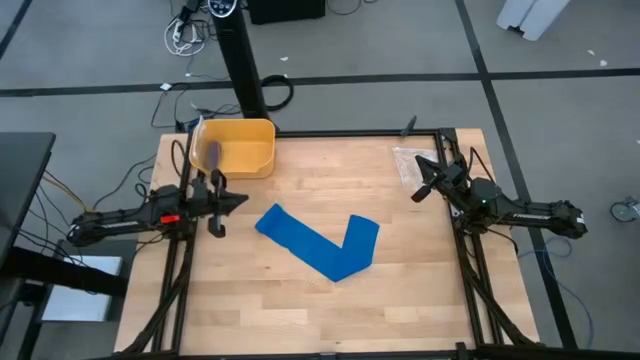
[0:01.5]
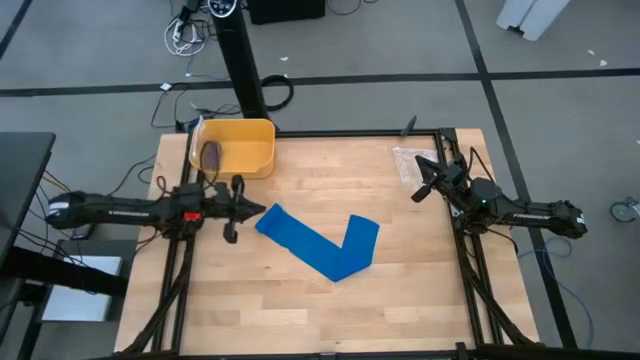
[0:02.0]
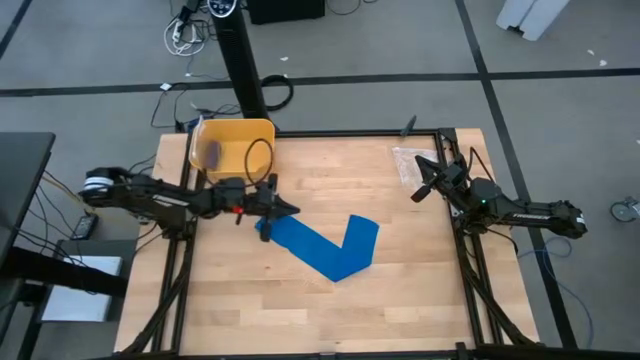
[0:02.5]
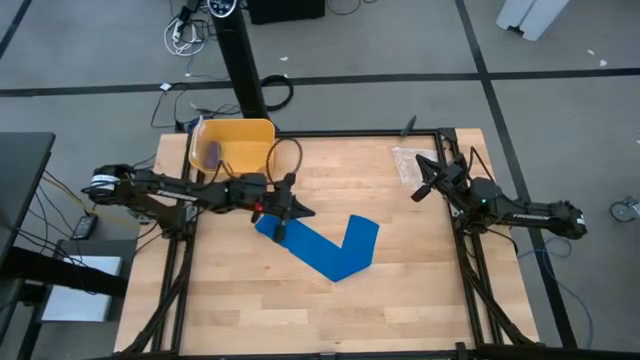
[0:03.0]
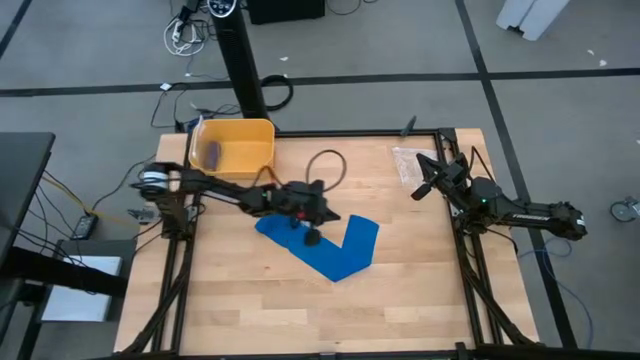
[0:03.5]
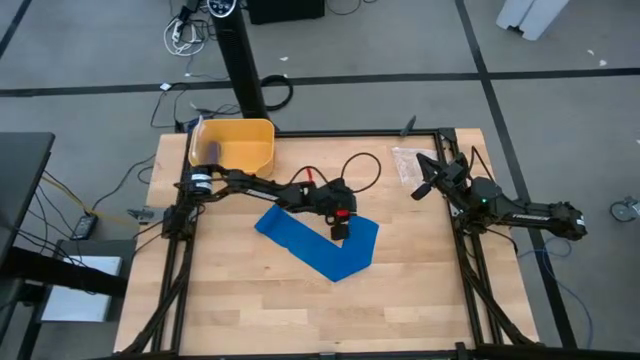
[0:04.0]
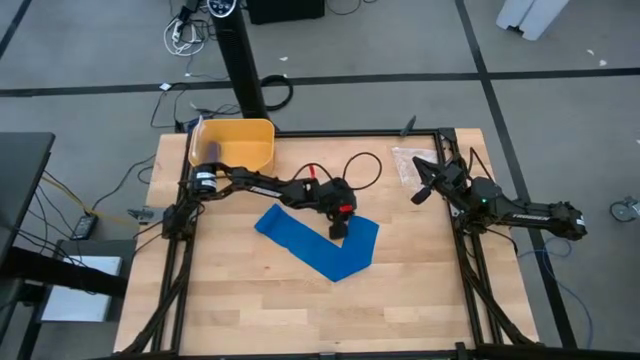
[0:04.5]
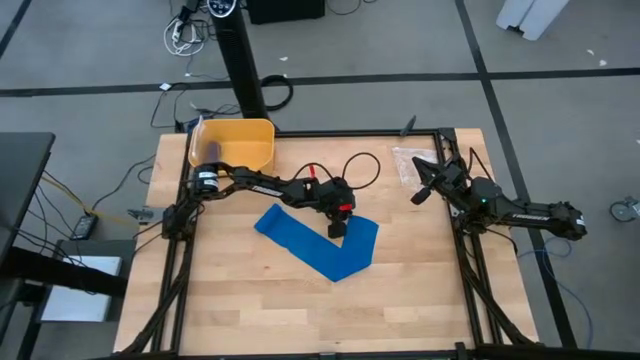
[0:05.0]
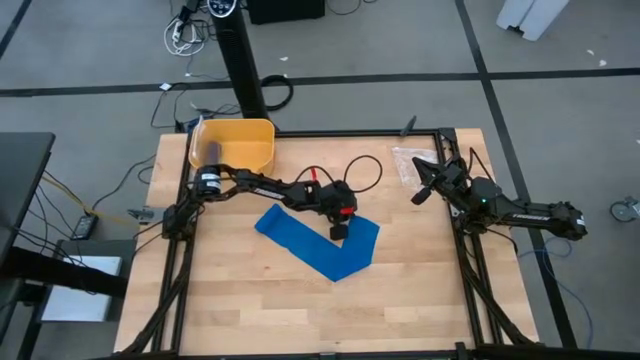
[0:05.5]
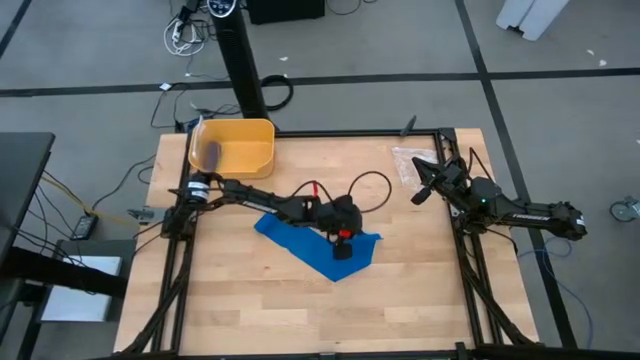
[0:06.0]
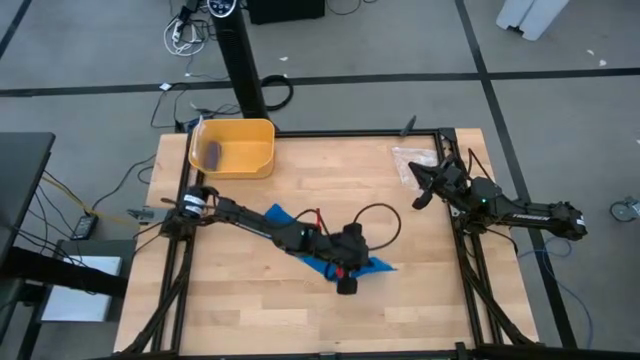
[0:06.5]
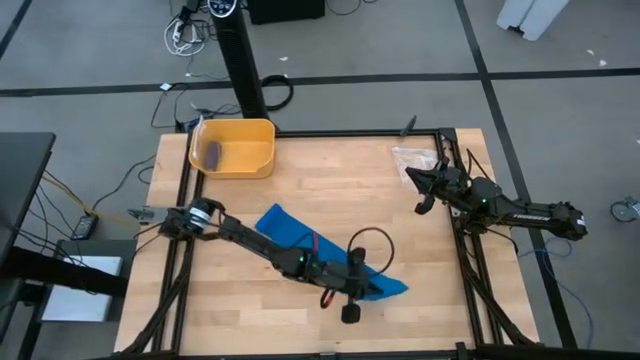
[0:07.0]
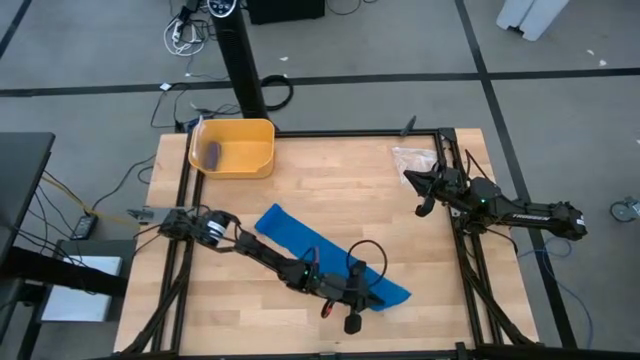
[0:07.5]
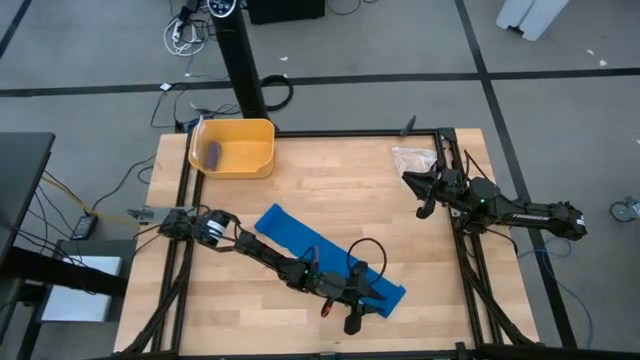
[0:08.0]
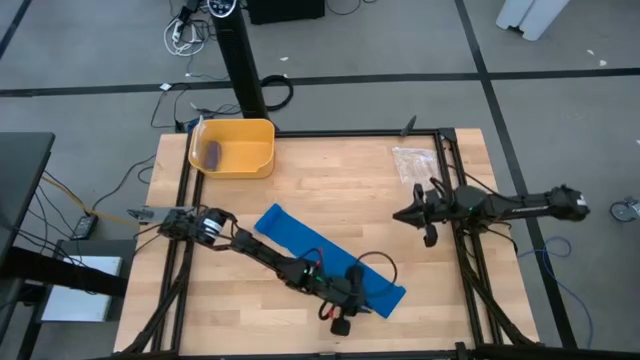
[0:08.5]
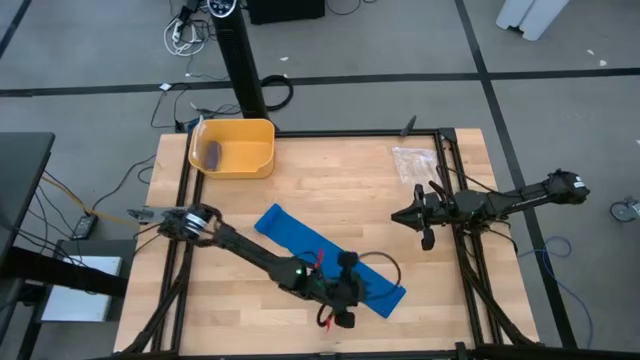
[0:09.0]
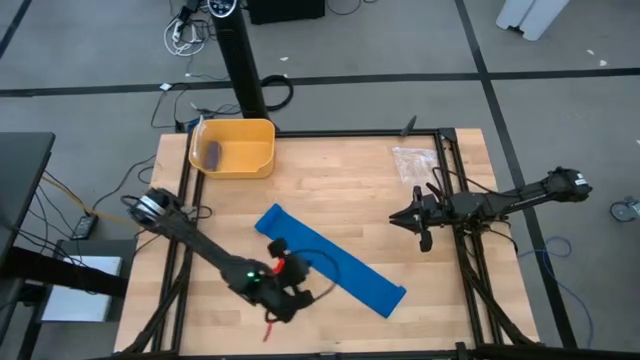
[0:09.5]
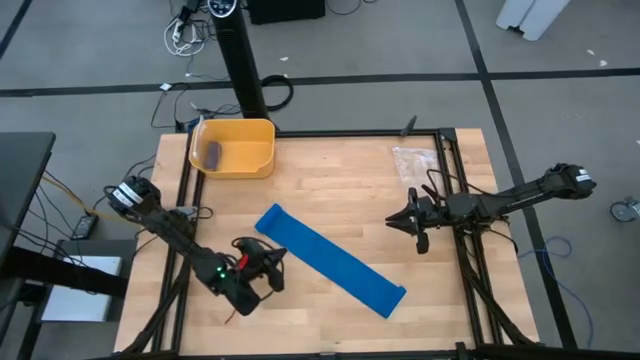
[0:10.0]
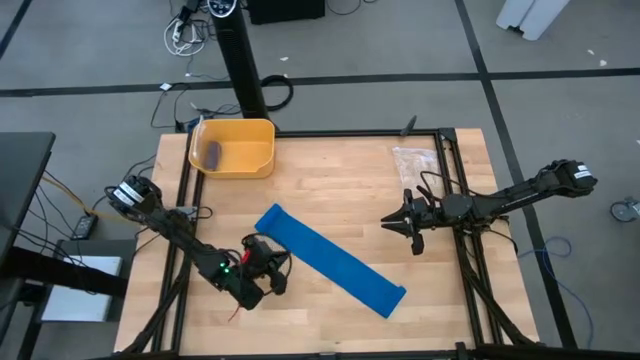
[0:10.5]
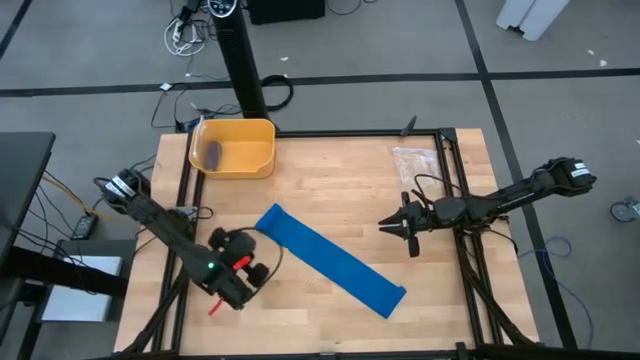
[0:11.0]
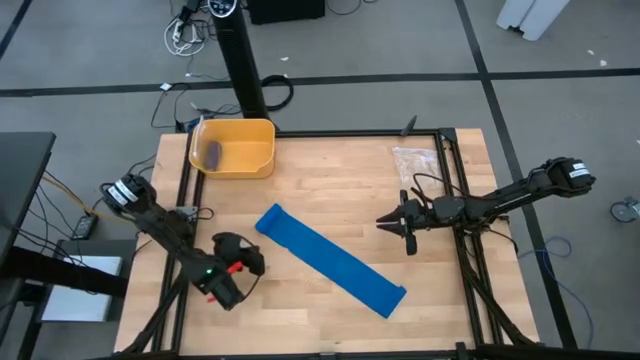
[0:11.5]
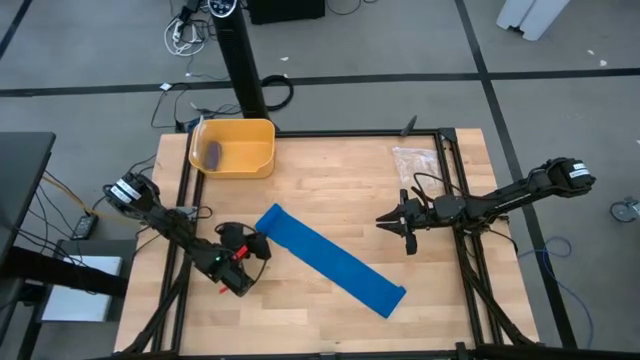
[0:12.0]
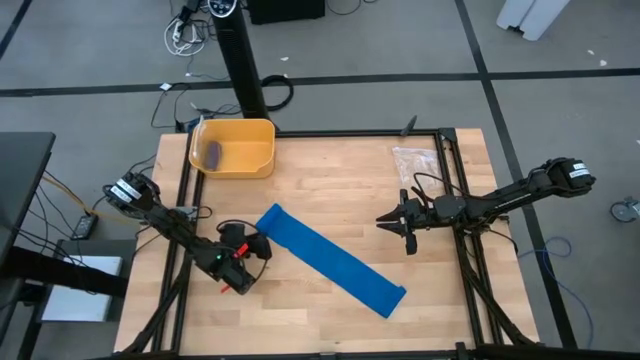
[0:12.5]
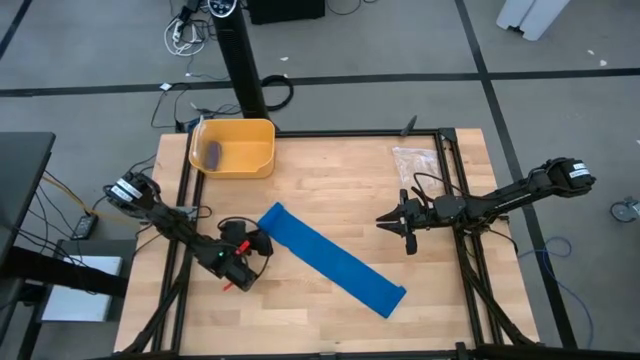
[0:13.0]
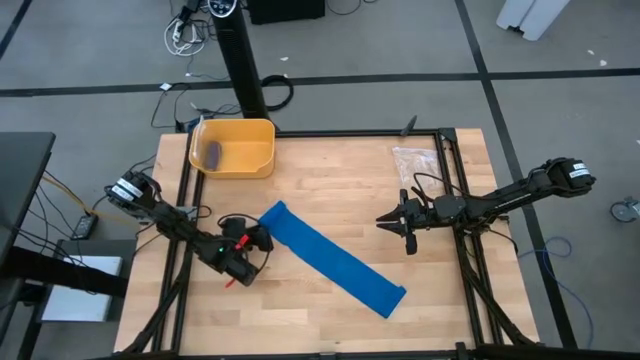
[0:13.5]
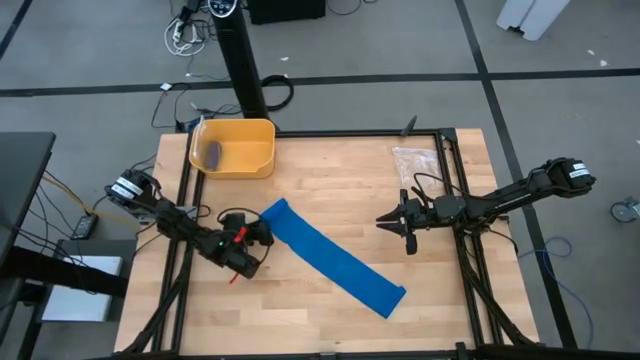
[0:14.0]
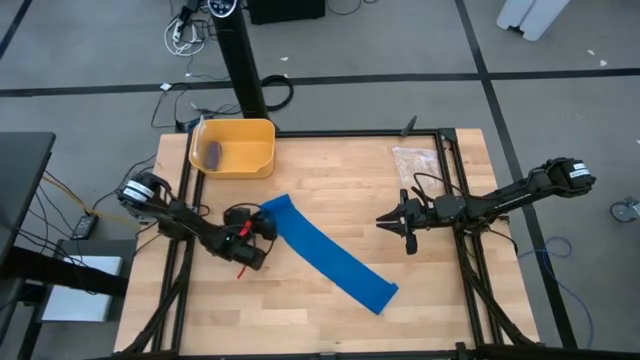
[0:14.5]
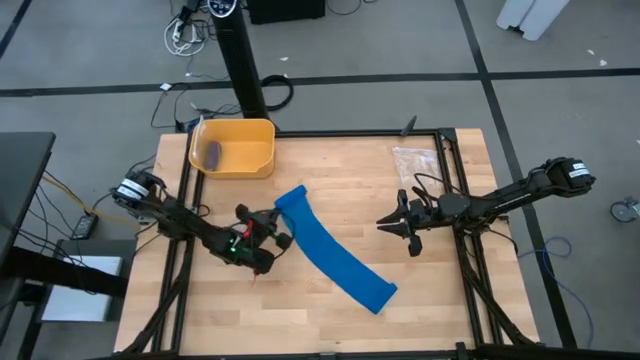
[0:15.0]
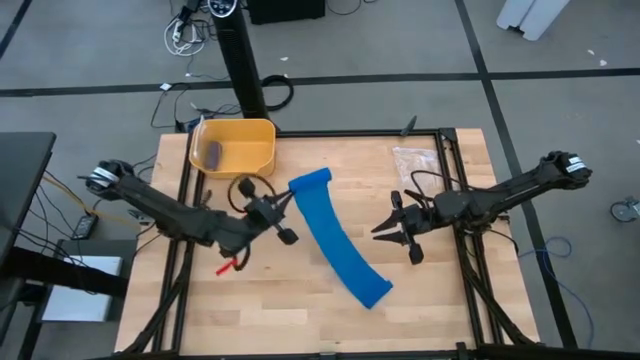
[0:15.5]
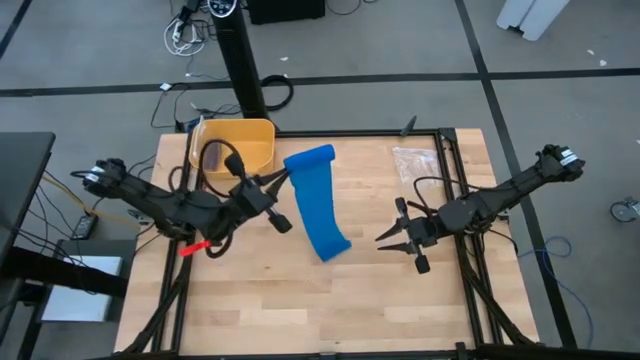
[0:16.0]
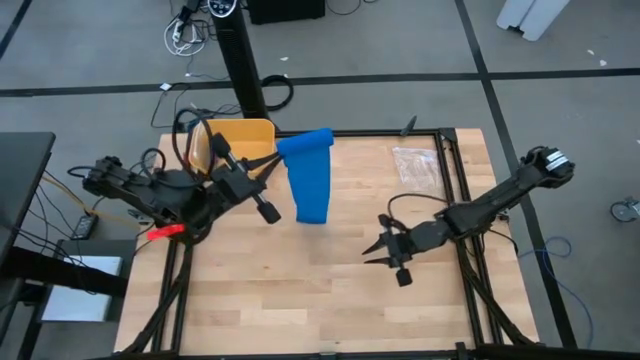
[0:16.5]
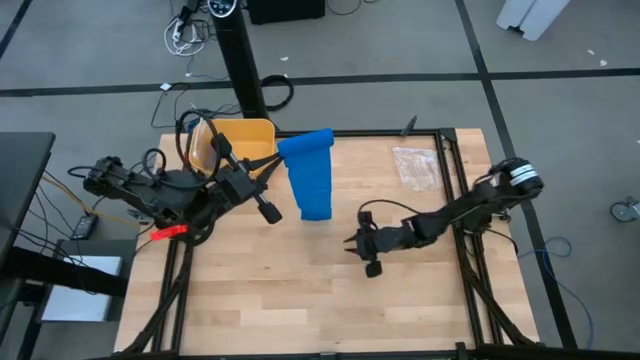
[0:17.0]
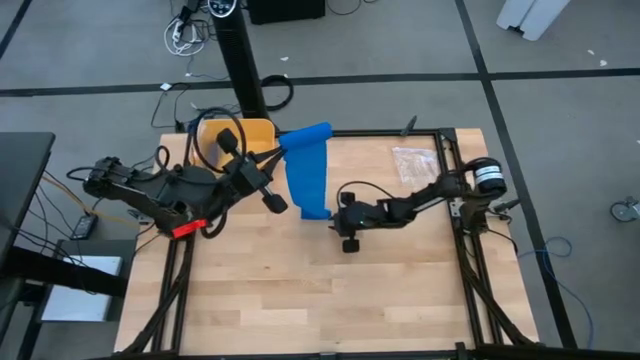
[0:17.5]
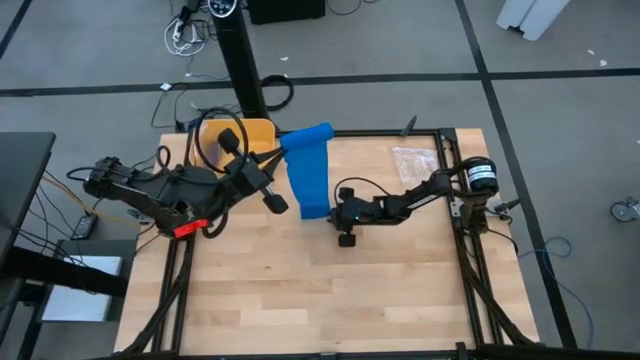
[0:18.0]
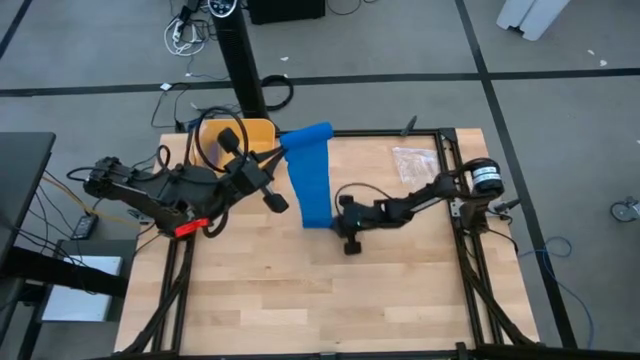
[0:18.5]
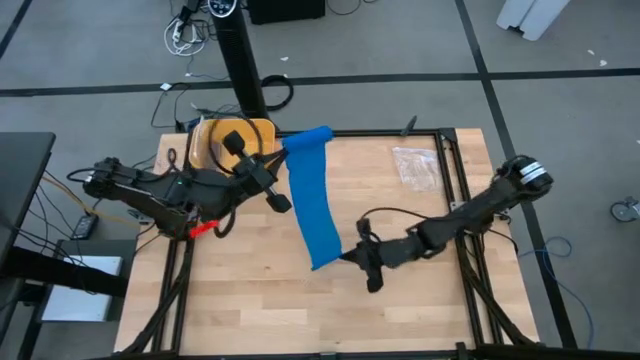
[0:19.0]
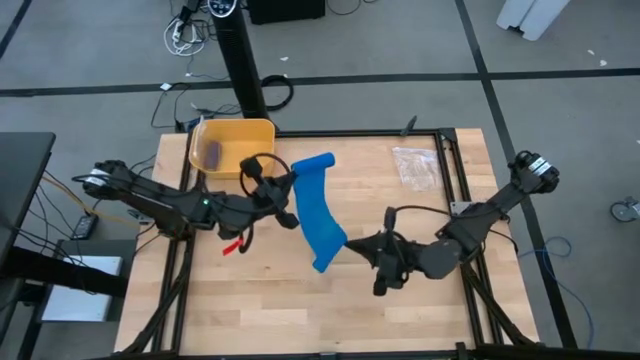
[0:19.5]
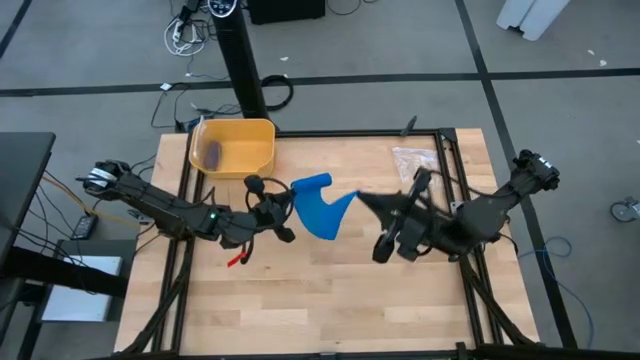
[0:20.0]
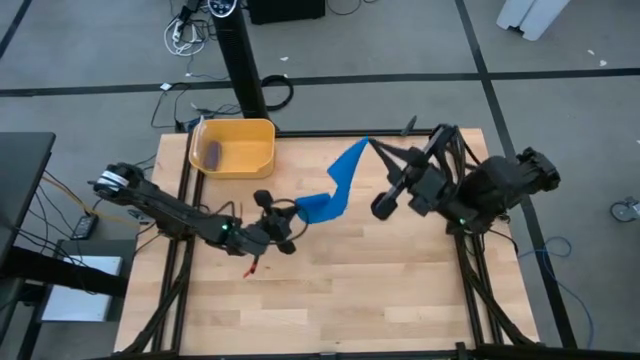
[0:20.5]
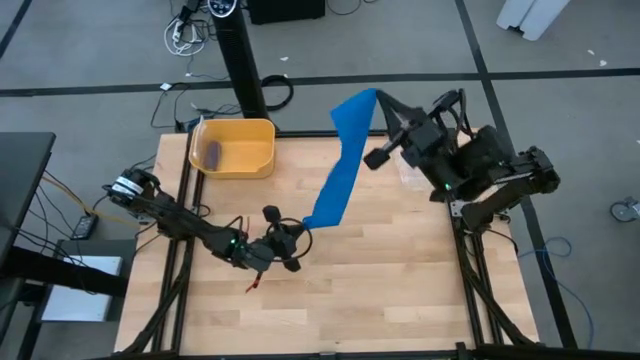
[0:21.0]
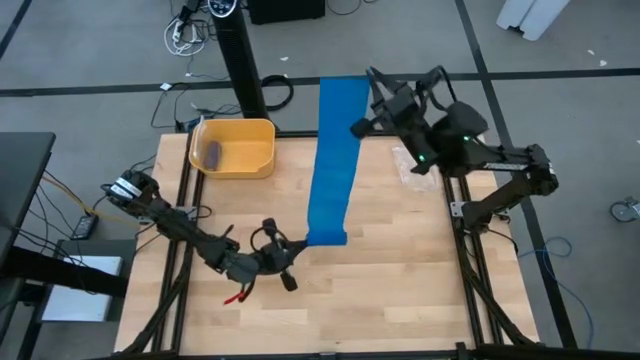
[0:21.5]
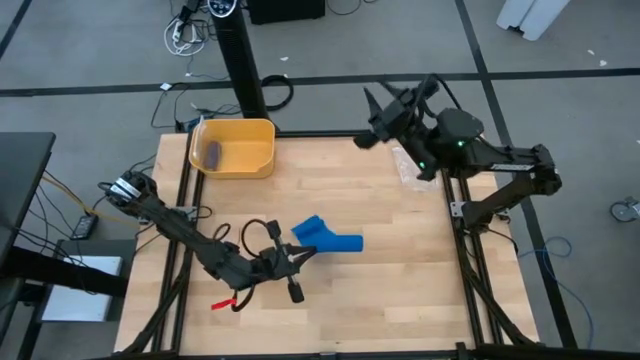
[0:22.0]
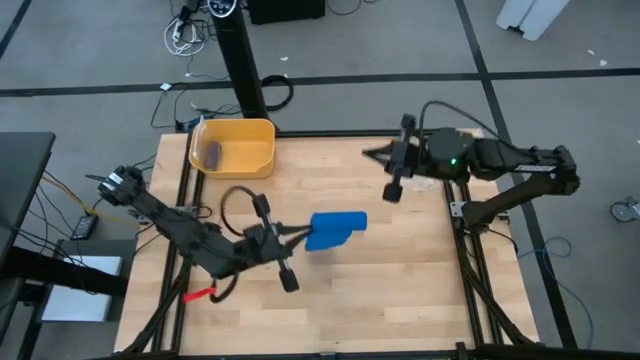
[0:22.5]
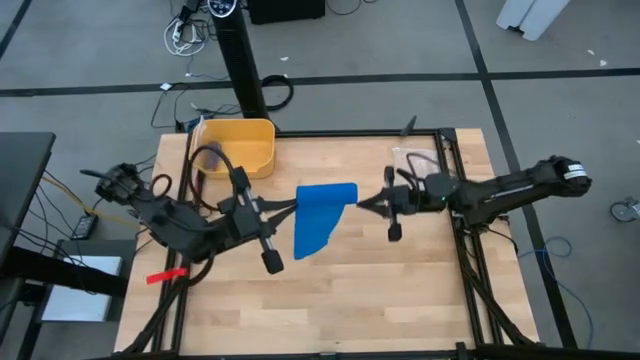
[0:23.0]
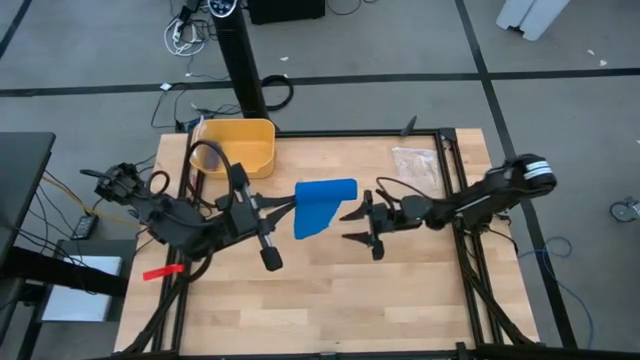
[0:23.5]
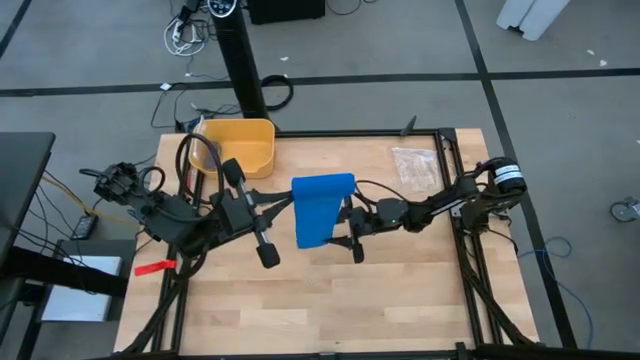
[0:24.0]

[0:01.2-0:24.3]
Task: Roll bandage
Roll the blue bandage
